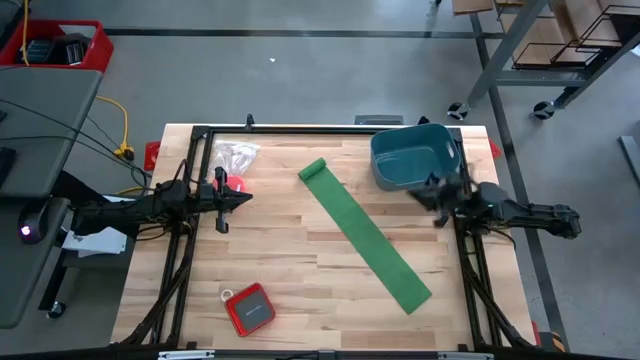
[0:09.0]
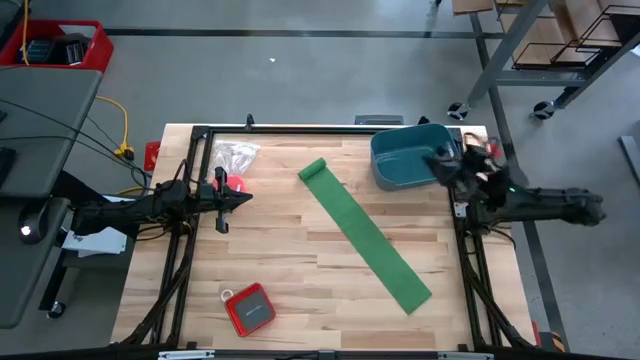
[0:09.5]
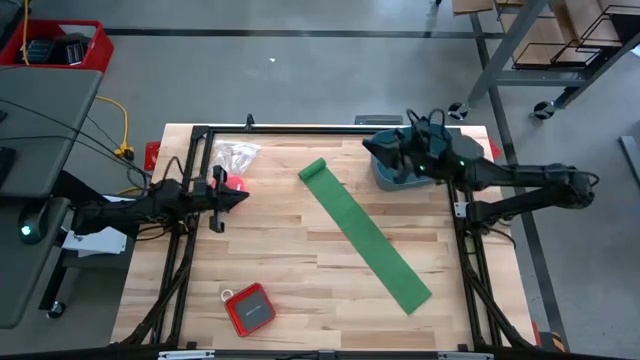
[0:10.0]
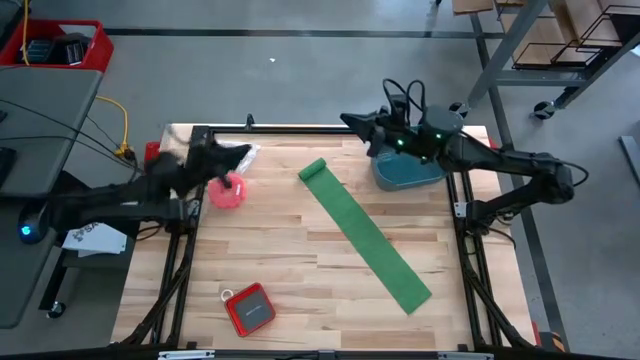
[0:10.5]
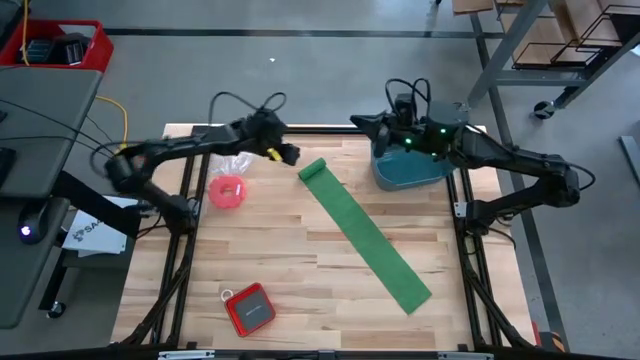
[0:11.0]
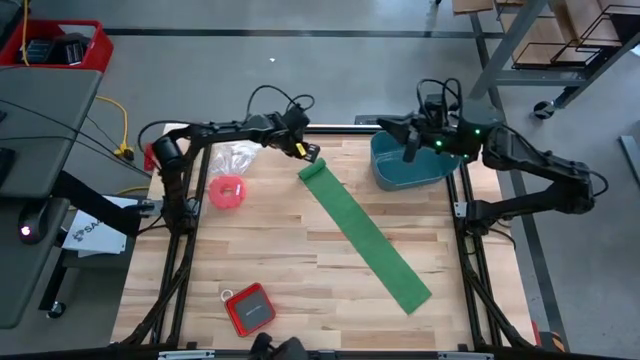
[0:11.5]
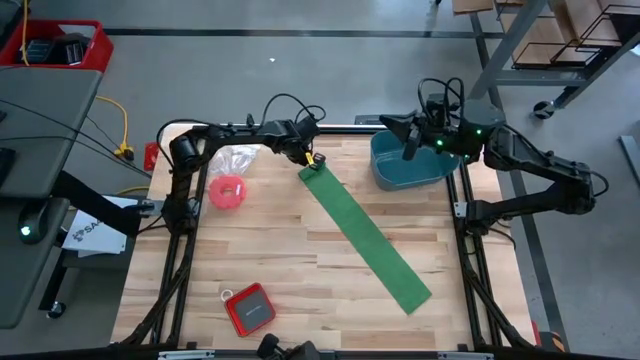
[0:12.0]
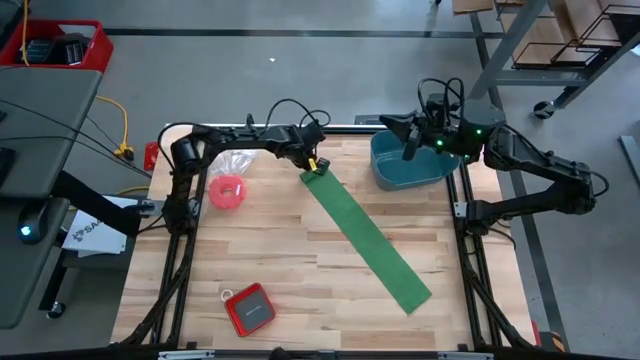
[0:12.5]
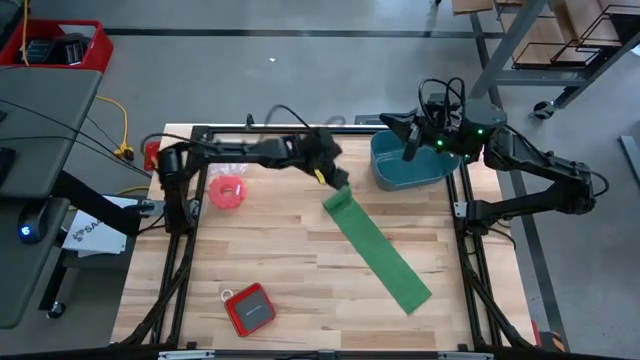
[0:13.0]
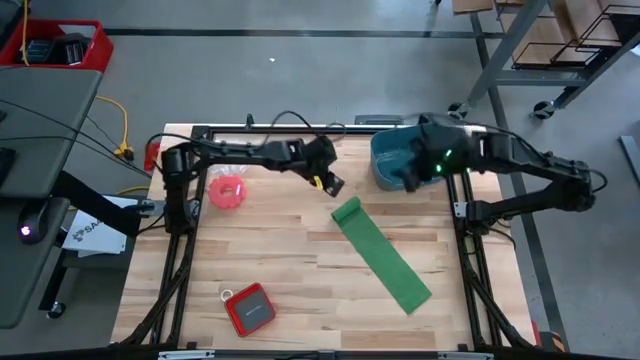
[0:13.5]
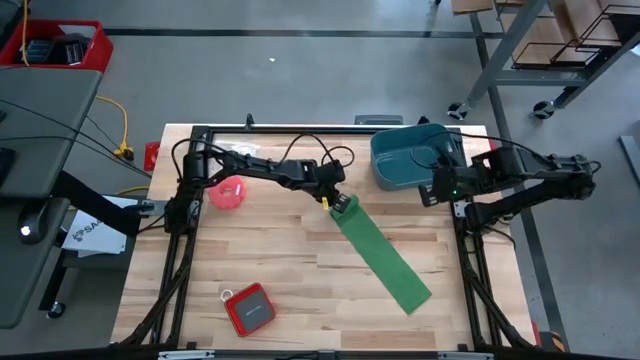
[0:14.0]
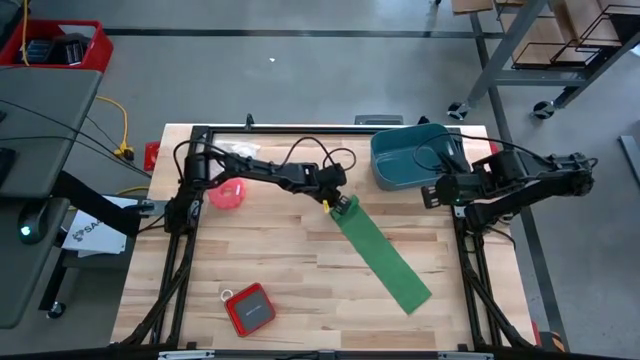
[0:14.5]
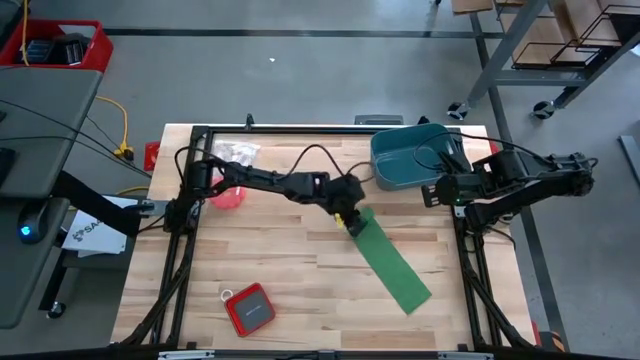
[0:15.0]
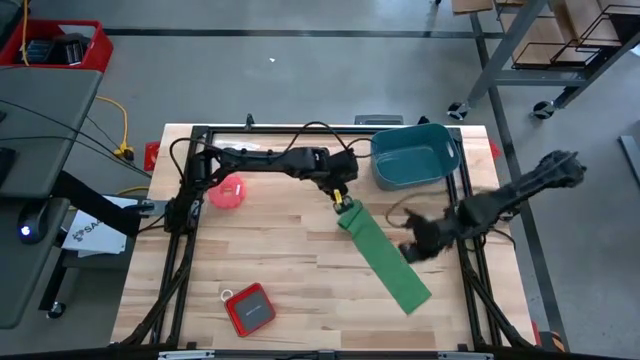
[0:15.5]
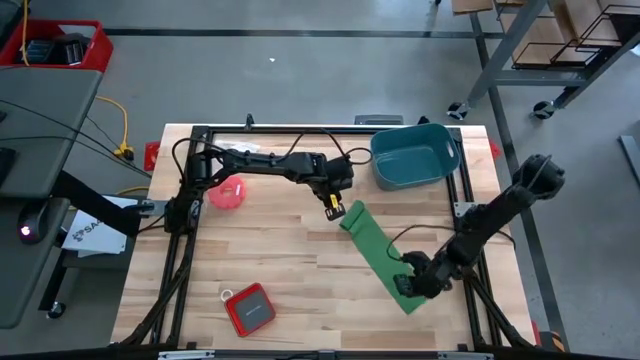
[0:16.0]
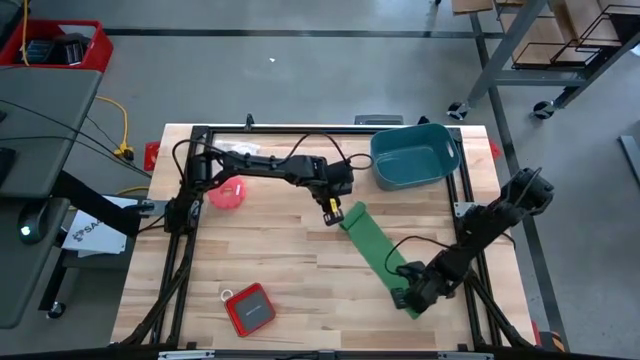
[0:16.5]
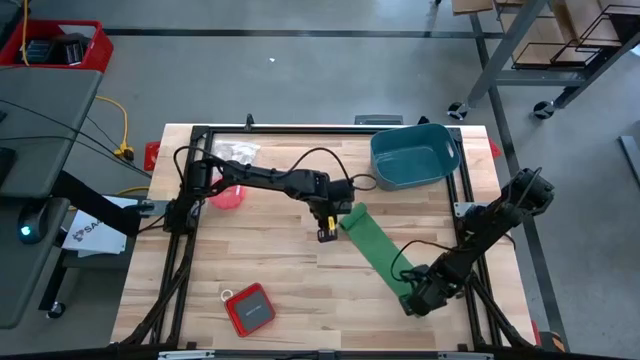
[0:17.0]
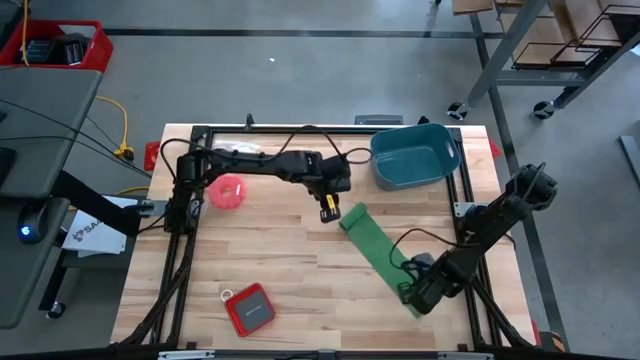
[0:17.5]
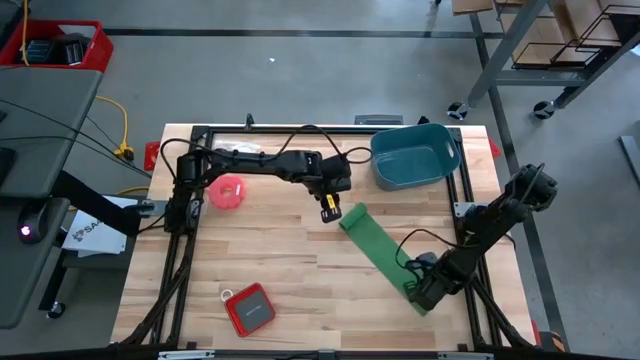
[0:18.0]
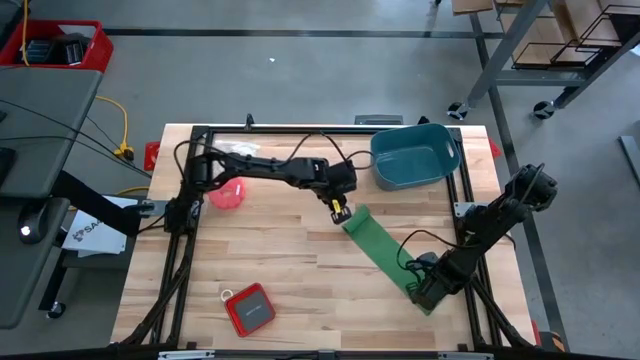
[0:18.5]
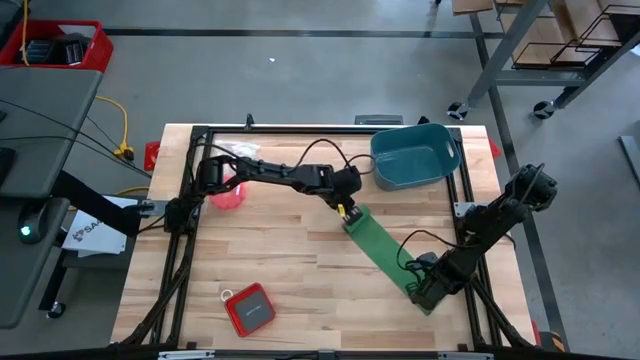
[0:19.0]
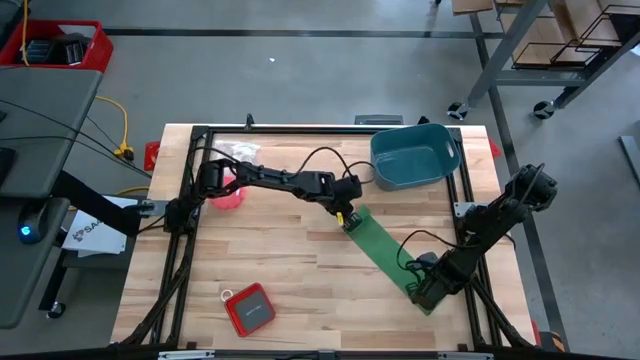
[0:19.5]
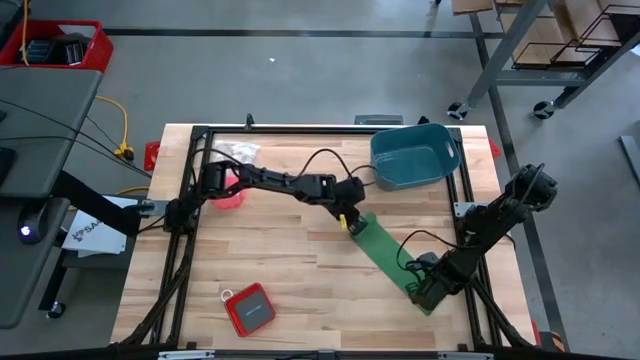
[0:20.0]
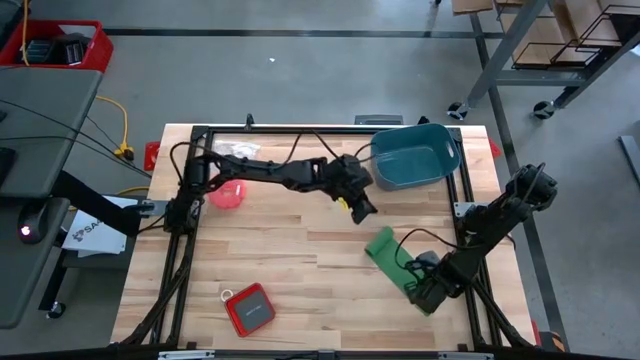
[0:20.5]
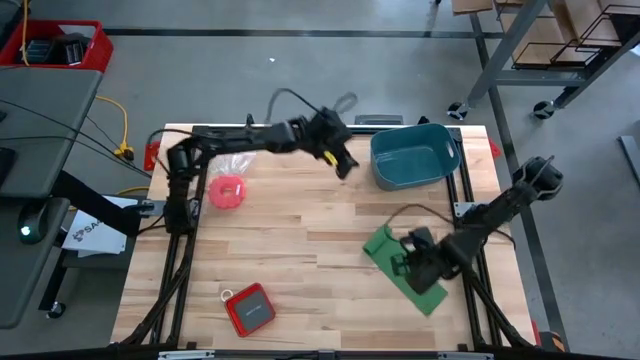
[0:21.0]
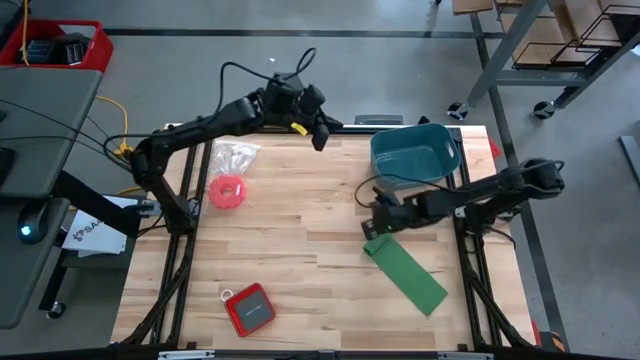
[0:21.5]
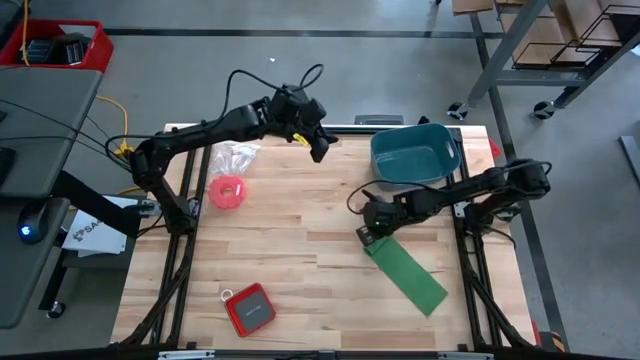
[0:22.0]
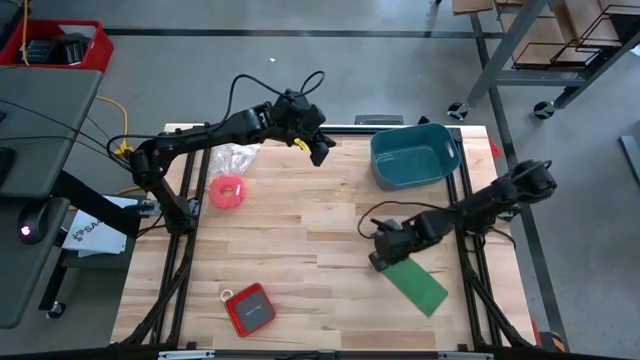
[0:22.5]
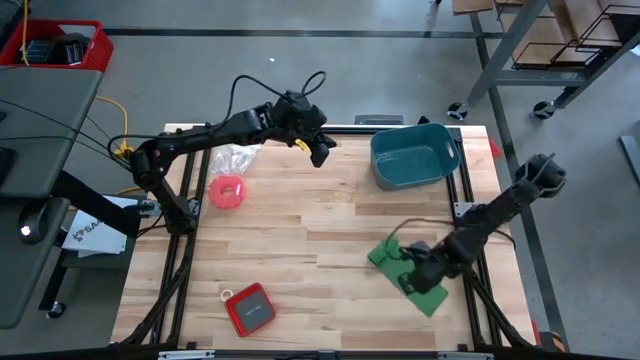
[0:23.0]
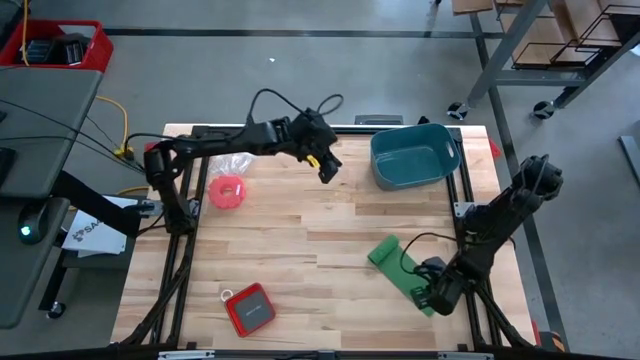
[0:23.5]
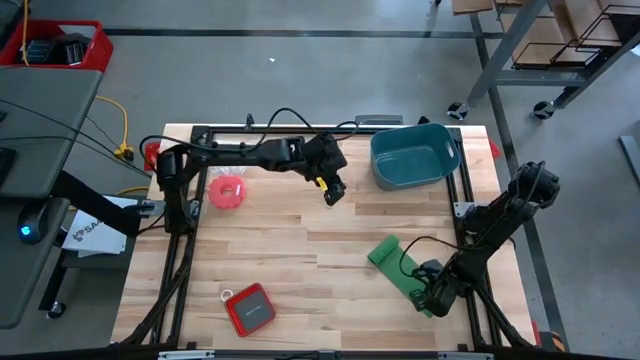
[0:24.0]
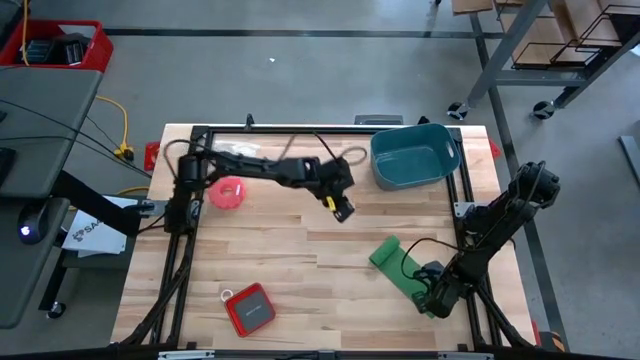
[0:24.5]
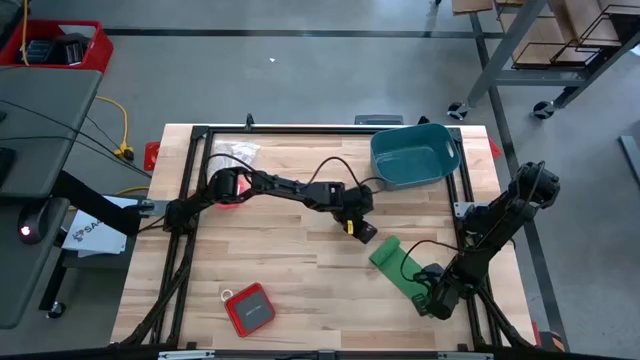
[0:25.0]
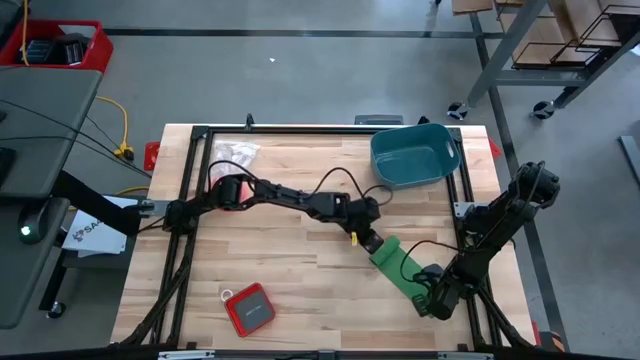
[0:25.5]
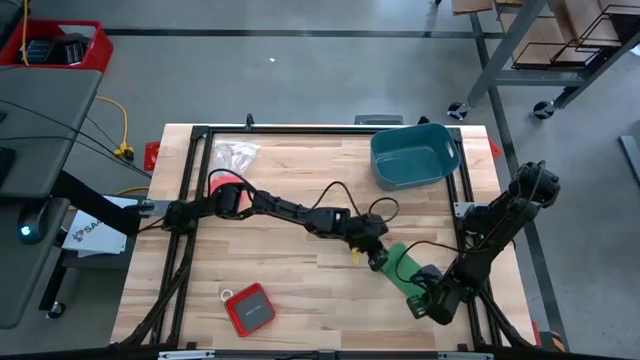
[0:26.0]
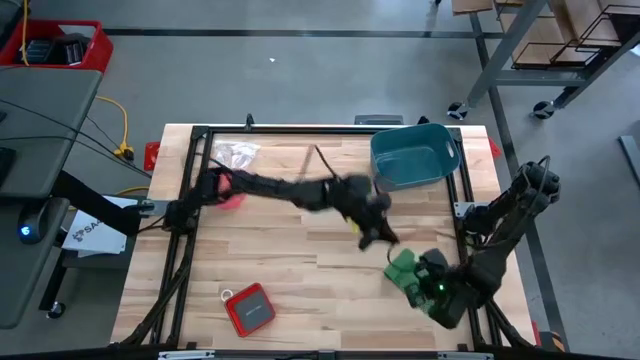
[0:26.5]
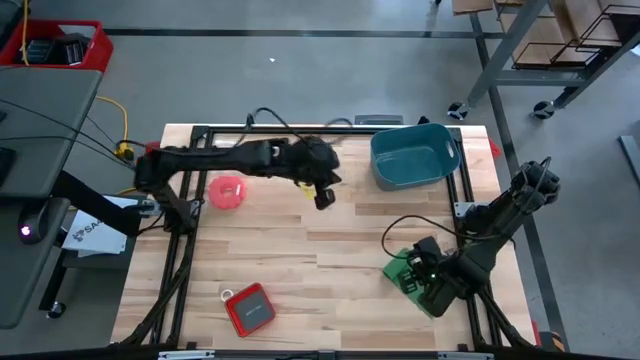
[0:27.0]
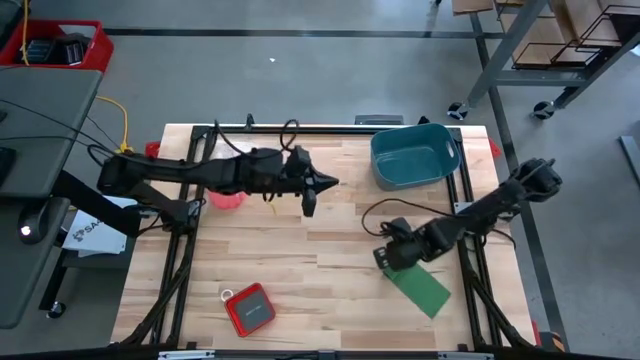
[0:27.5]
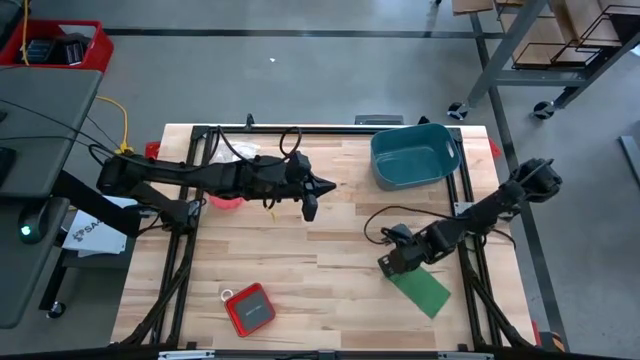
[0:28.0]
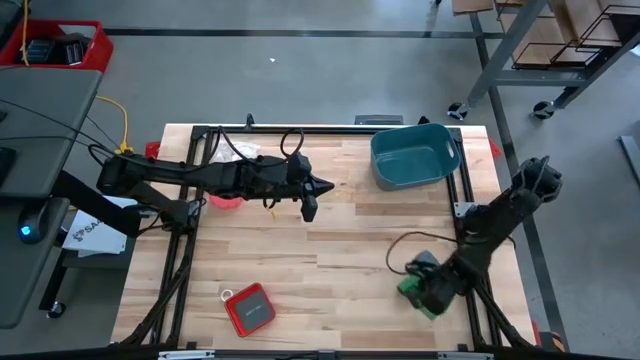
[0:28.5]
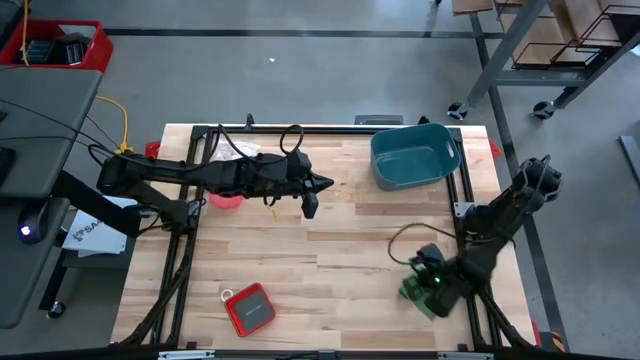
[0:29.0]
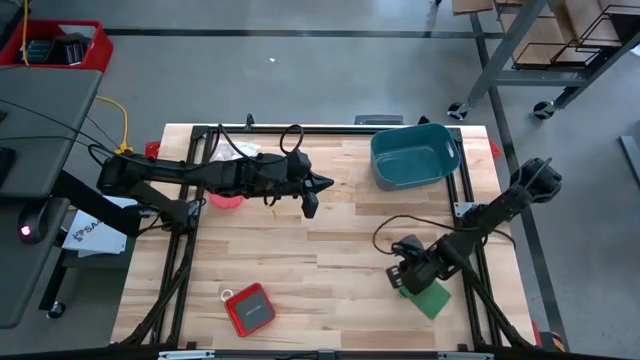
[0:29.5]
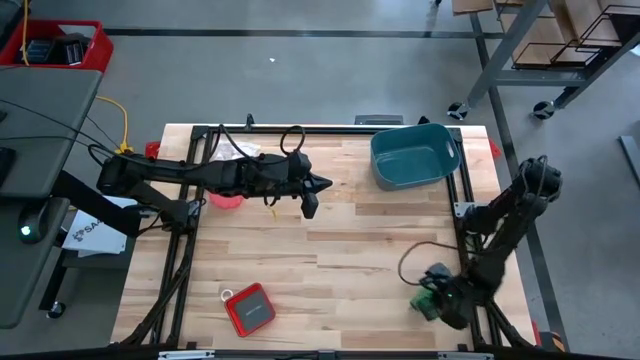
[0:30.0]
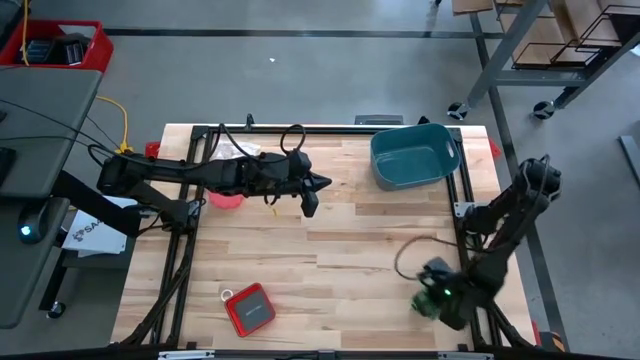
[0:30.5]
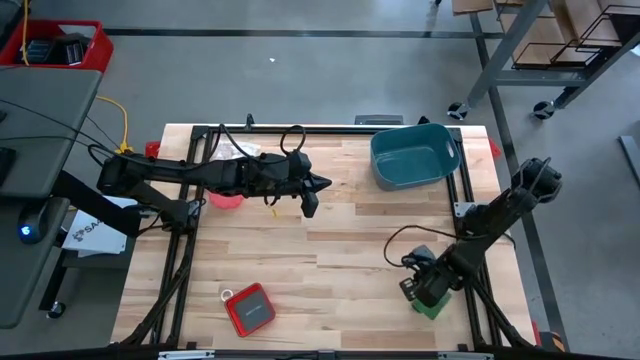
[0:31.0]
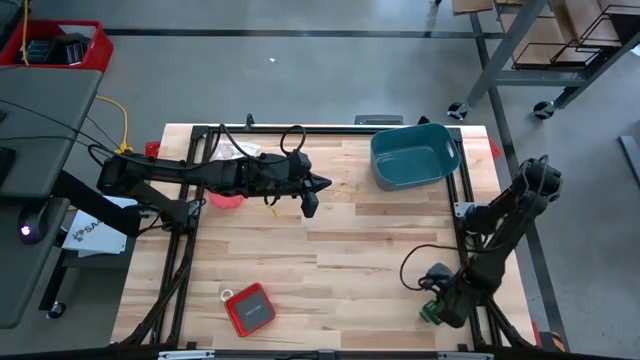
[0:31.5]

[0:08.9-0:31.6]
Task: Roll bandage
Roll the green bandage
